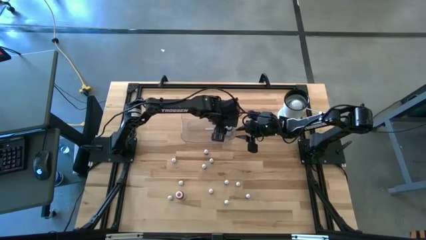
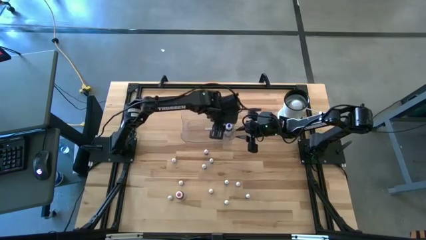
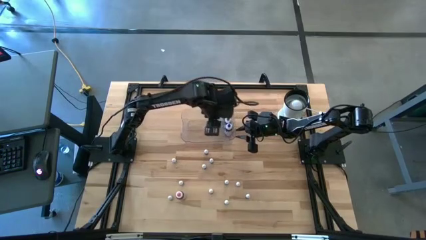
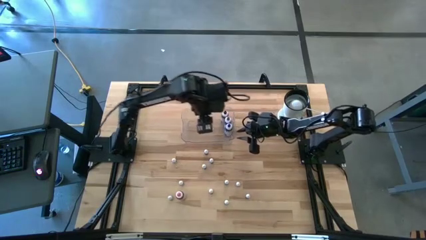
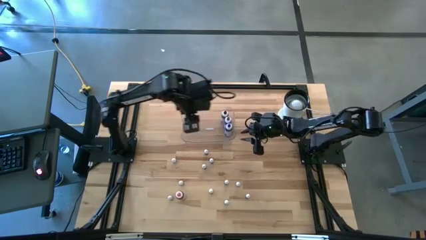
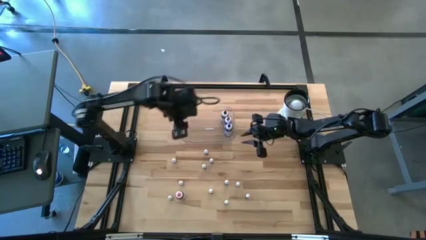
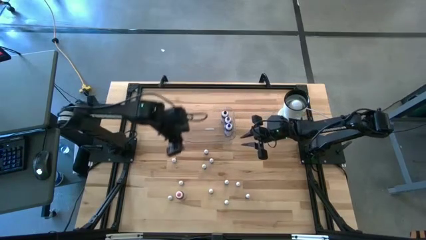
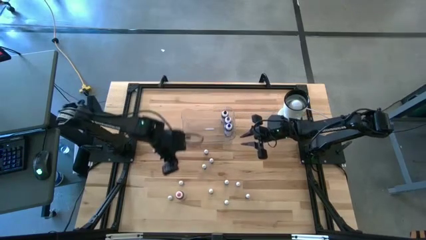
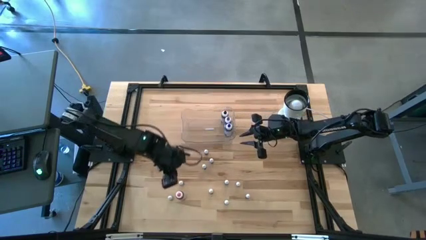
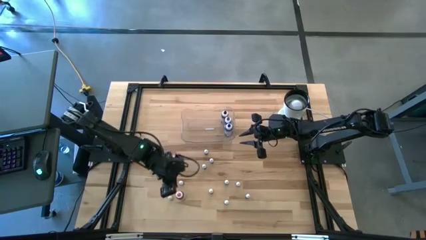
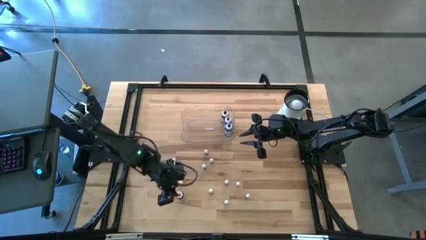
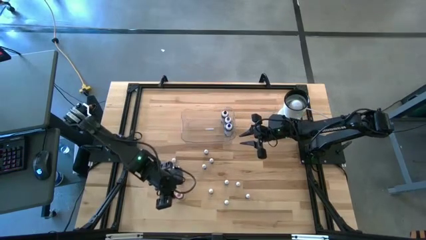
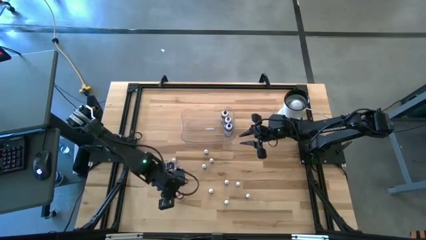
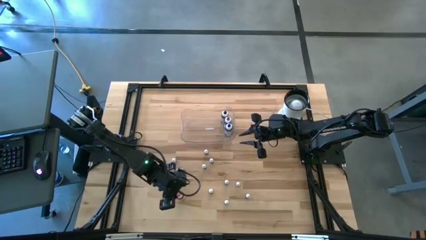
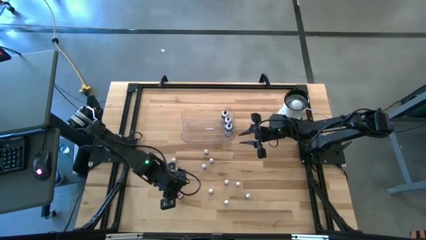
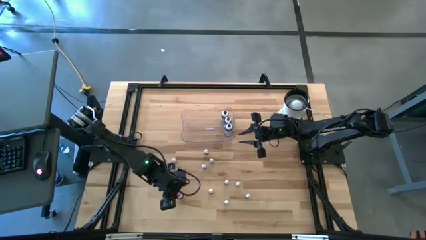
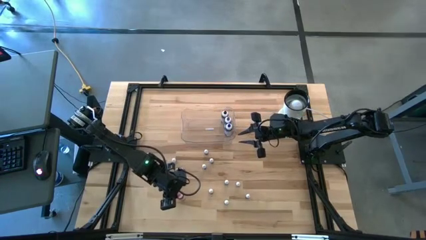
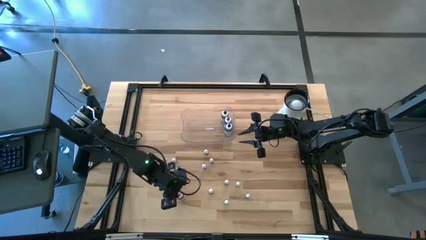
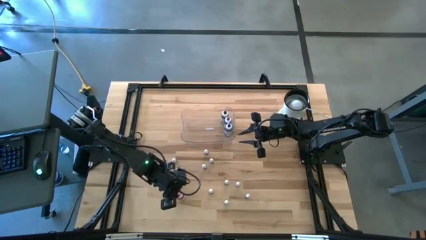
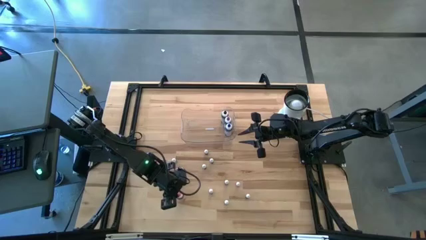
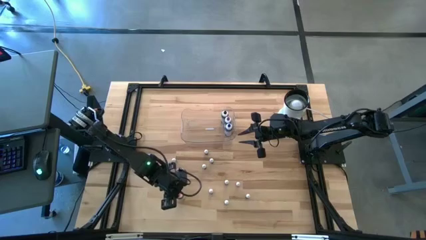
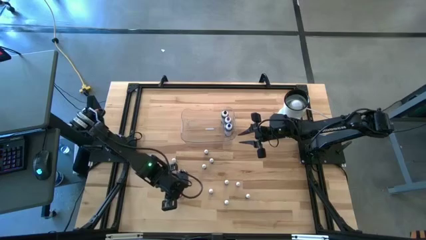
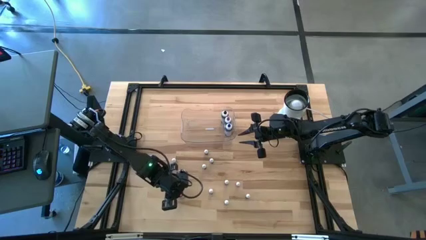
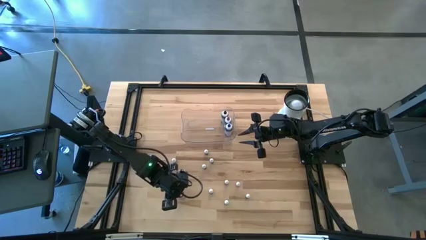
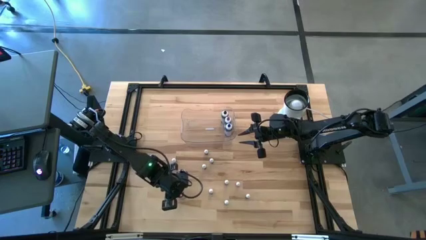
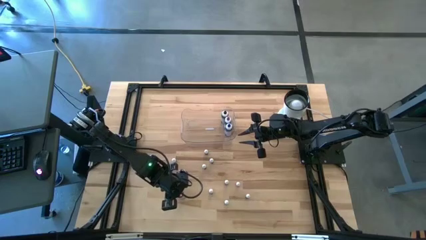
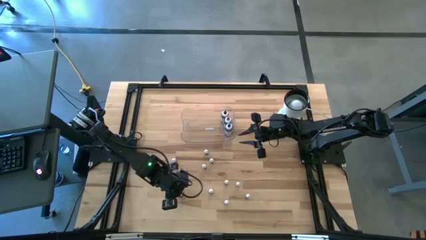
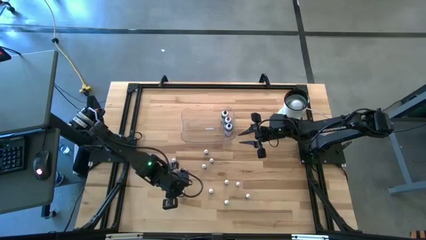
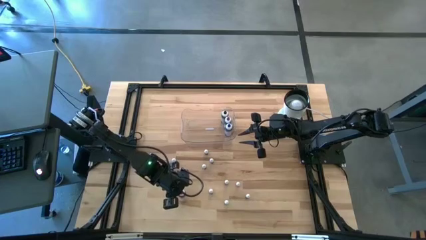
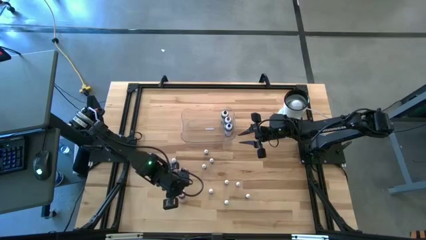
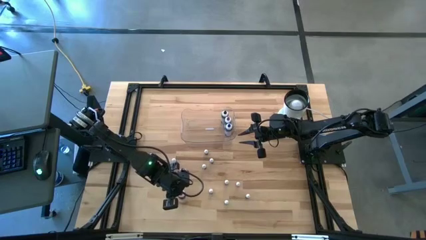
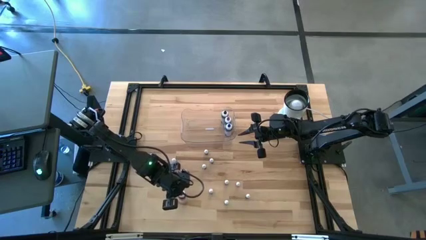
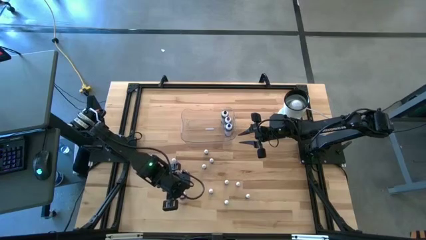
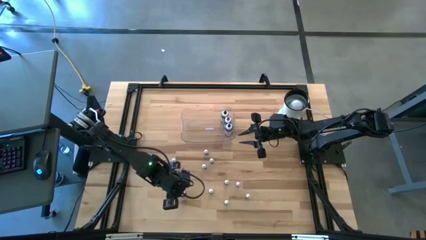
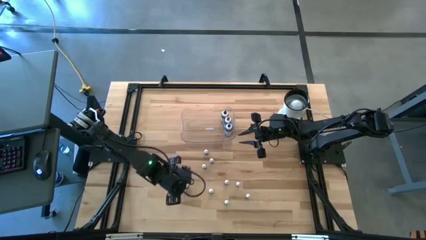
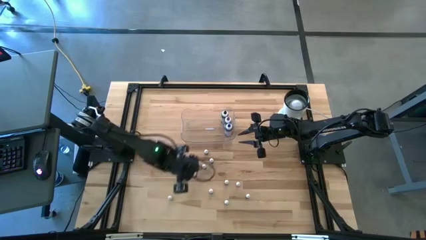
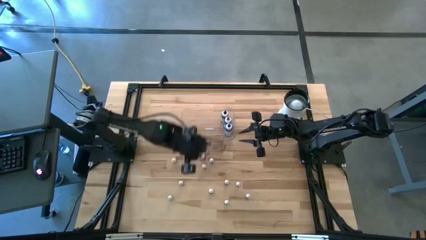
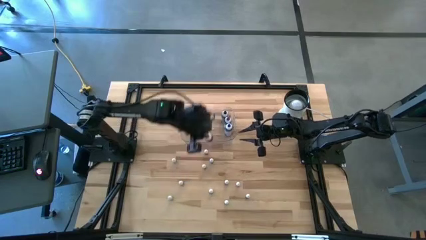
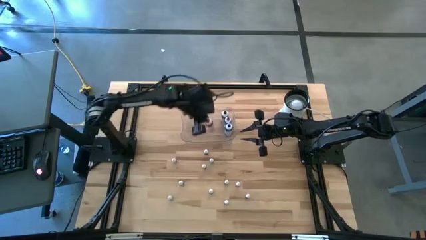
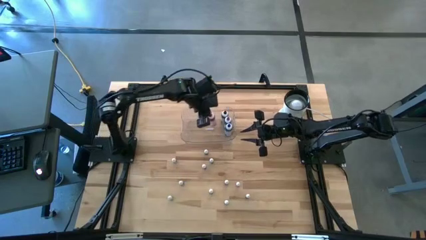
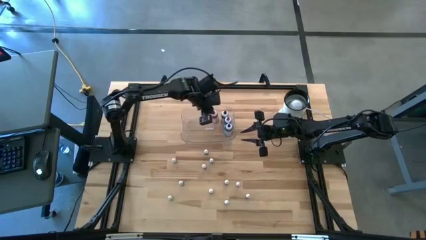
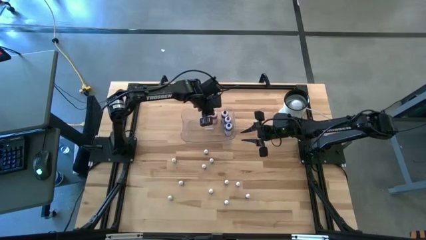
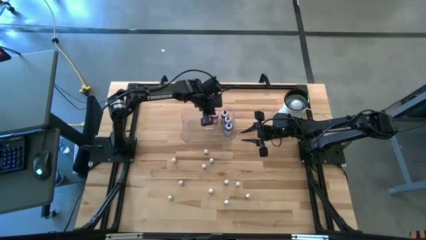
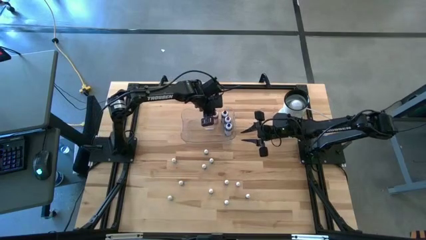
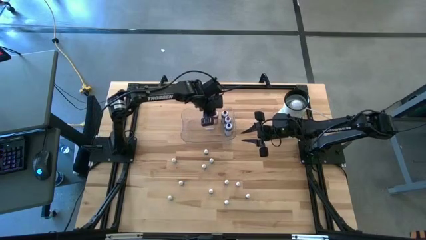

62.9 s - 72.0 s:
Task: Pick & Place food coloring
Put the large pink food coloring bottle into the transparent bin

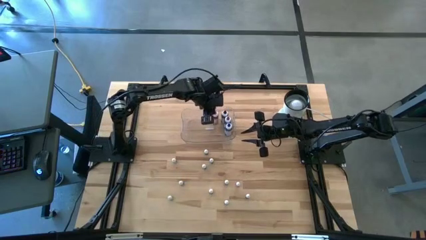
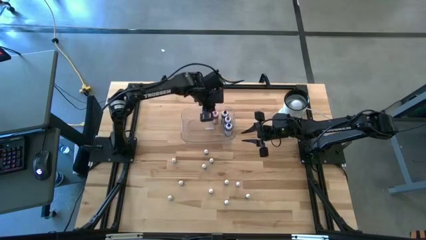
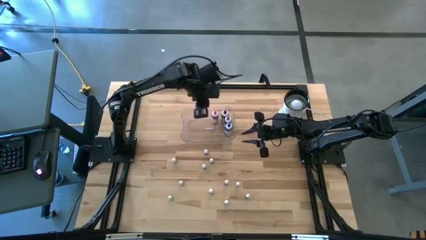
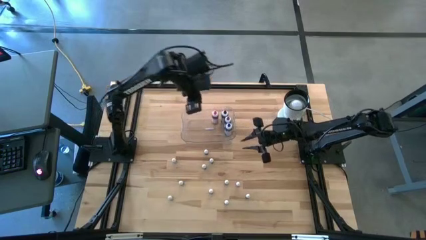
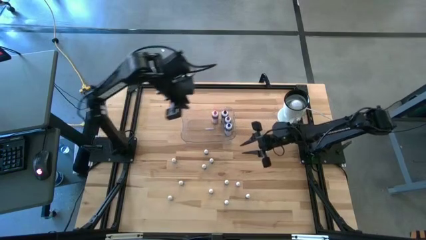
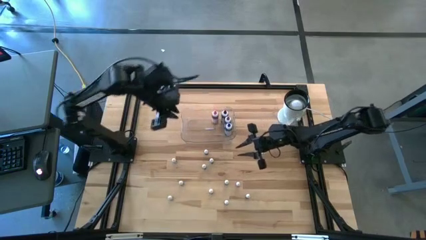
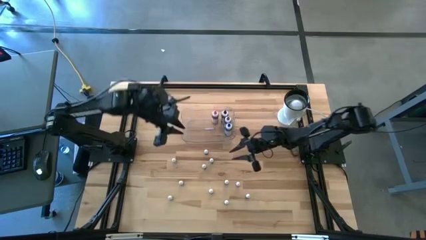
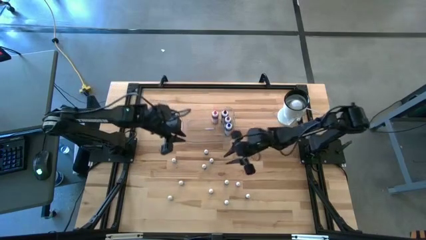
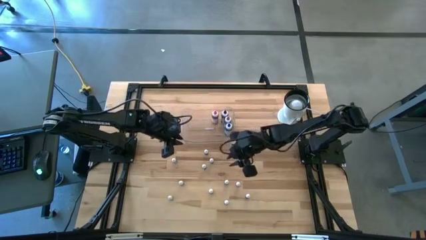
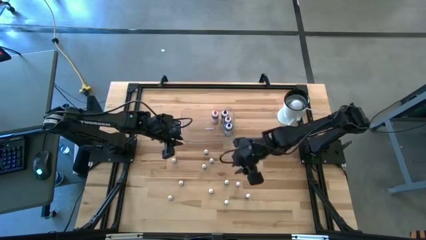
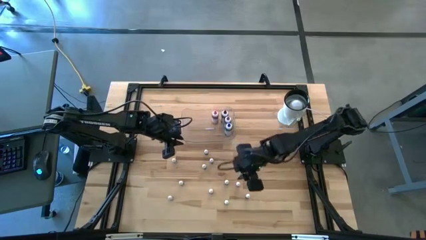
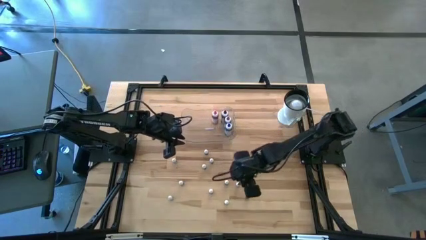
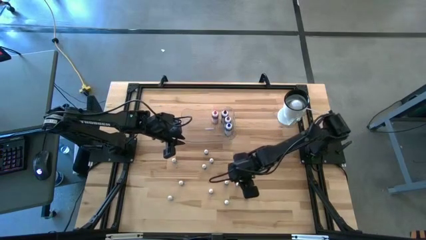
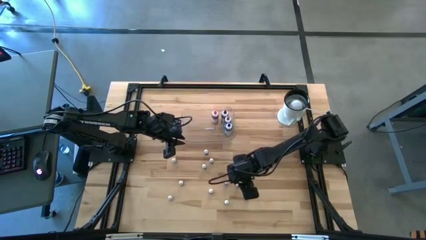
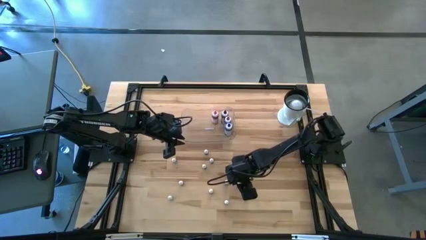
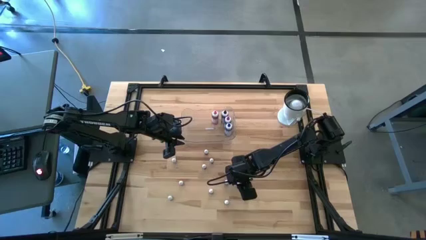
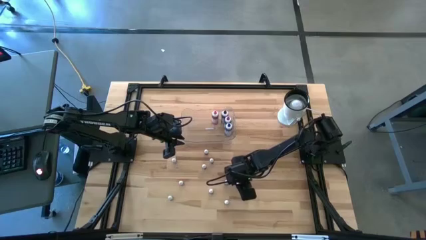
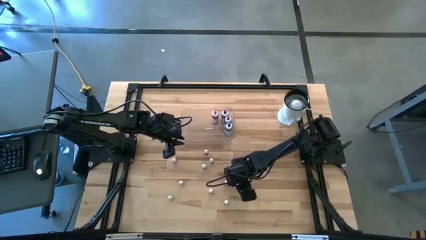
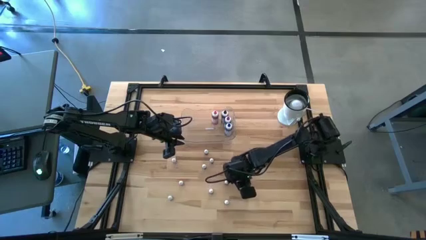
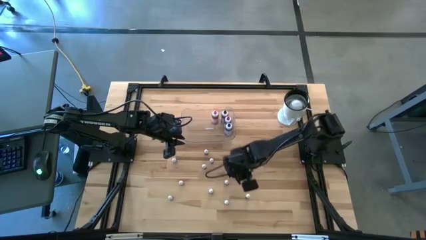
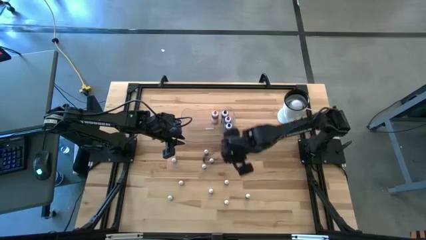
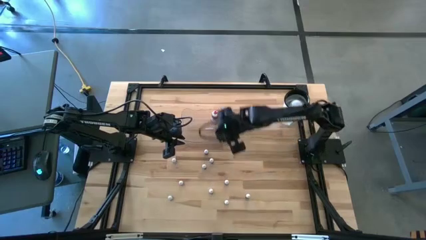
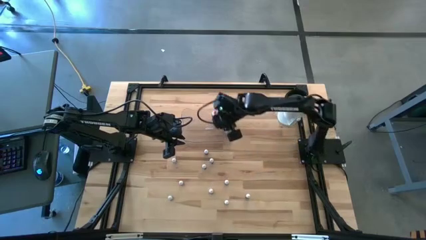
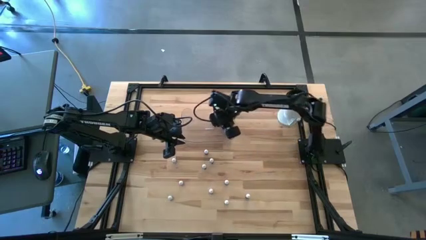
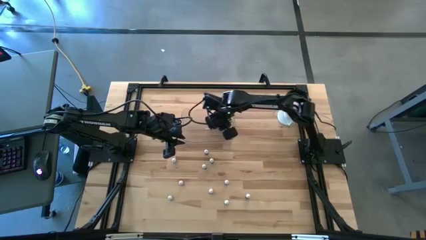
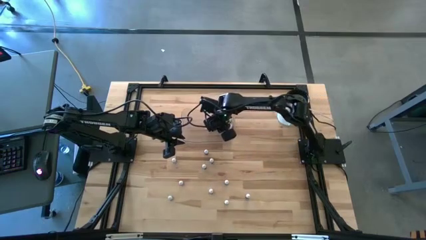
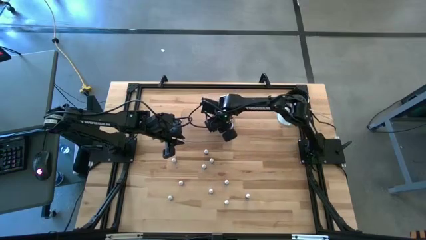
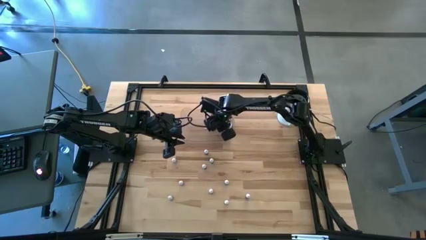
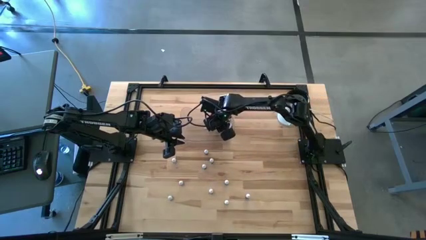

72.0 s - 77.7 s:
Put the small orange food coloring bottle into the transparent bin

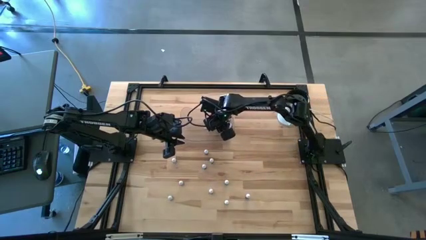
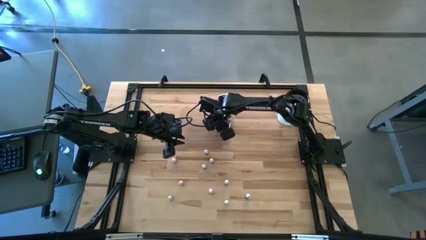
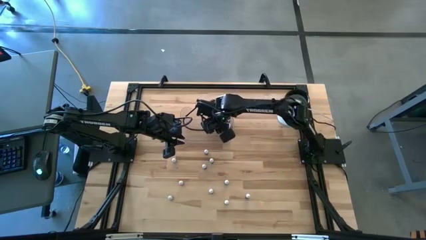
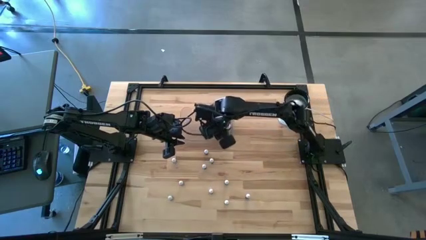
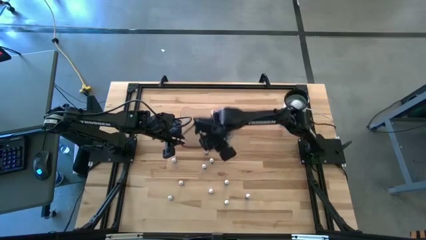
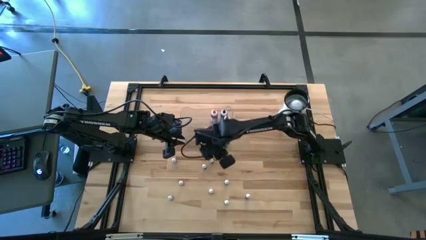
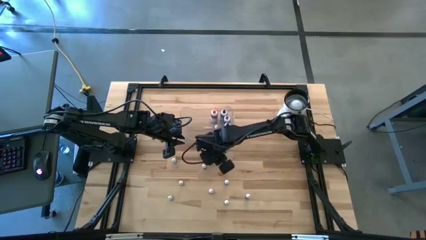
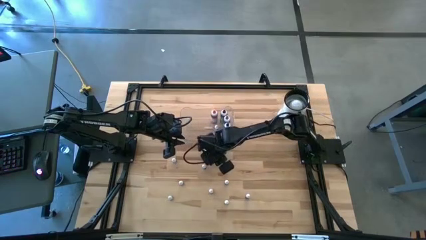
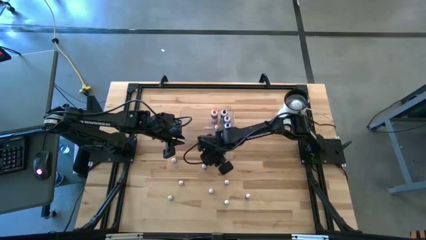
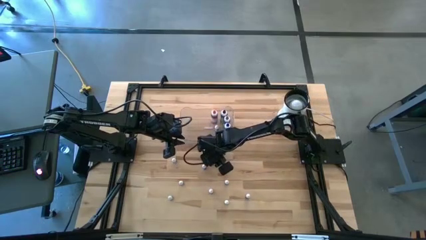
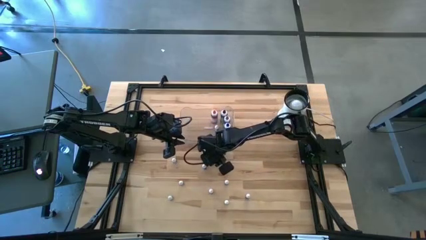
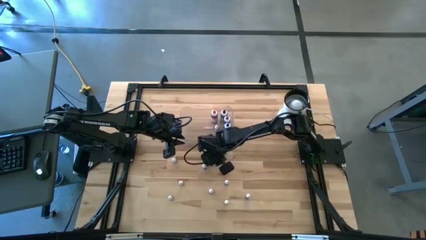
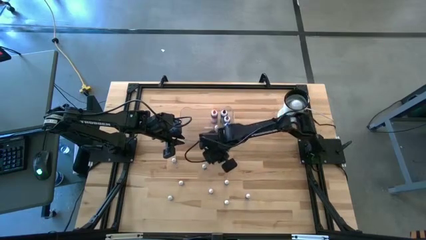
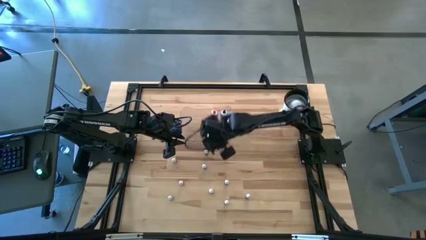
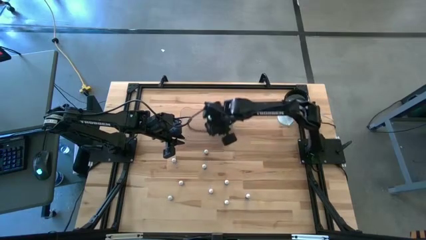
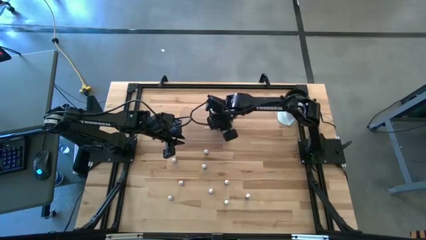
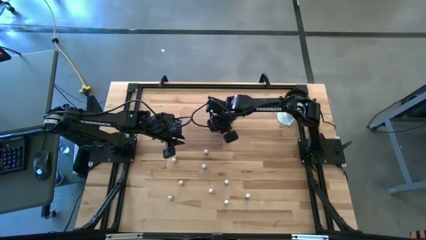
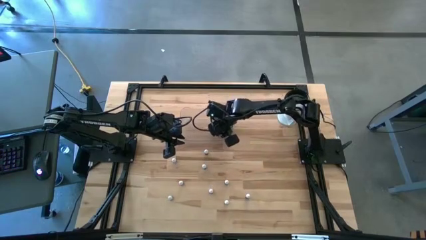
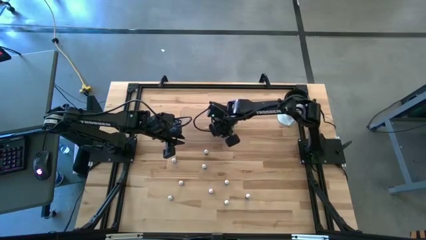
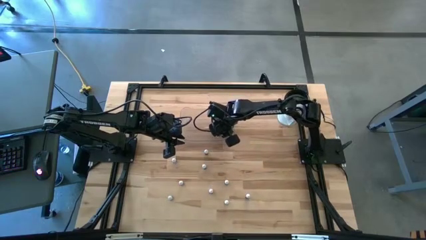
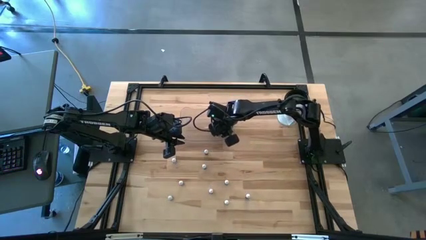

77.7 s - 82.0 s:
Put the small black food coloring bottle into the transparent bin
